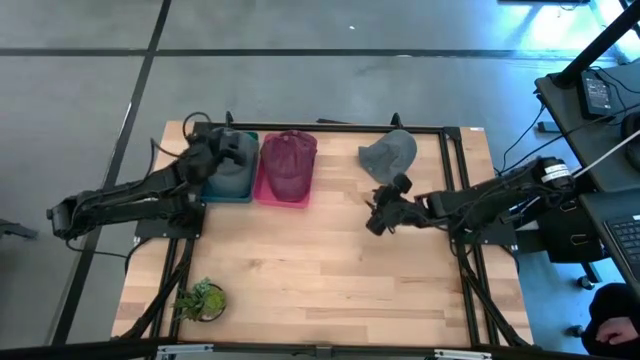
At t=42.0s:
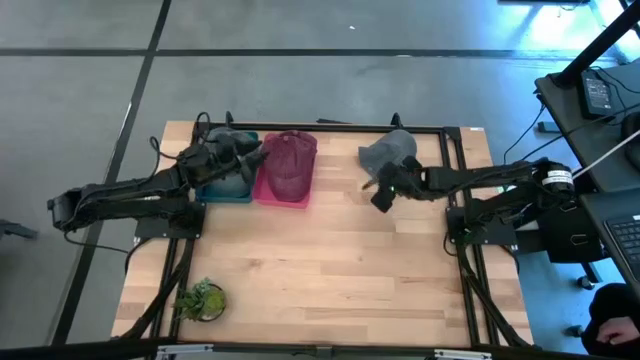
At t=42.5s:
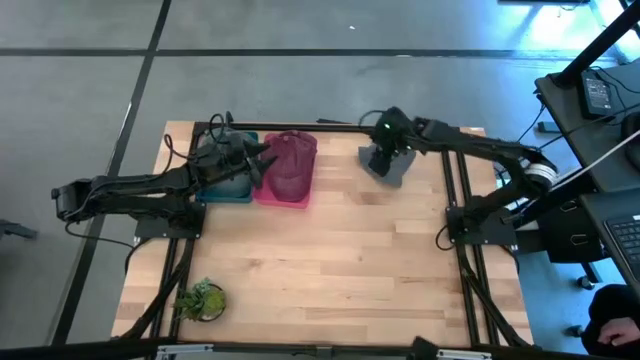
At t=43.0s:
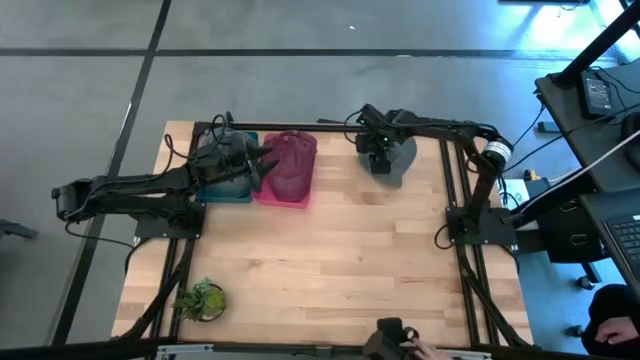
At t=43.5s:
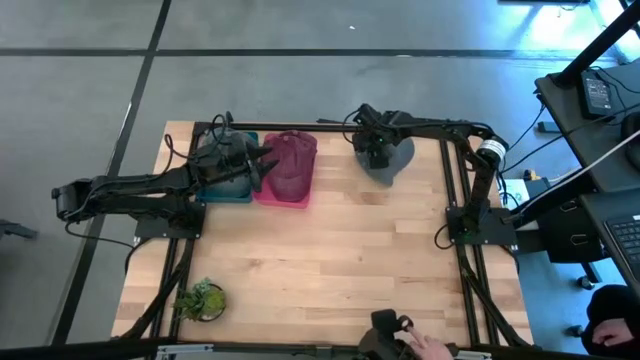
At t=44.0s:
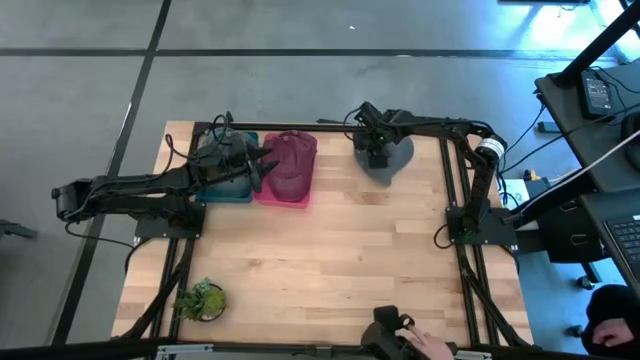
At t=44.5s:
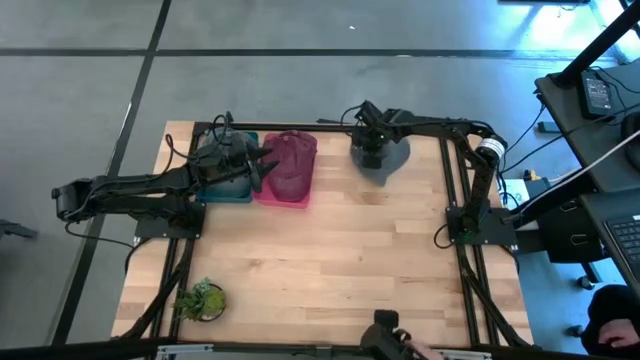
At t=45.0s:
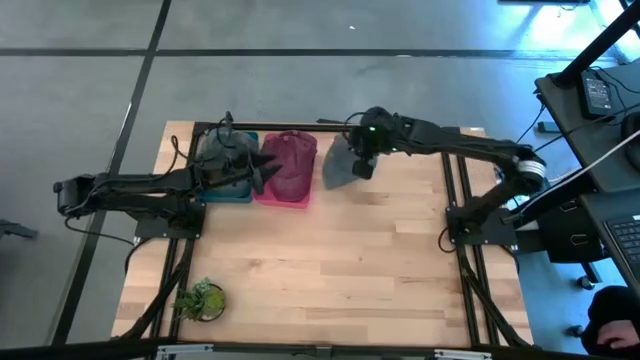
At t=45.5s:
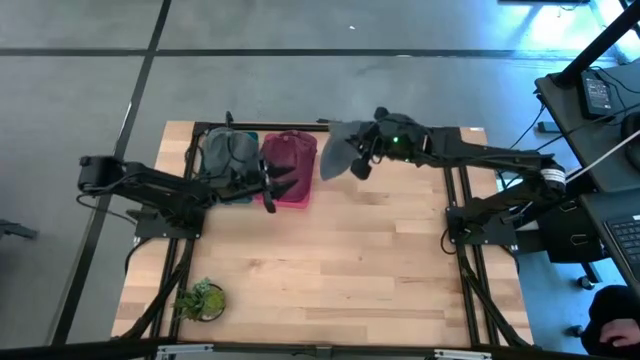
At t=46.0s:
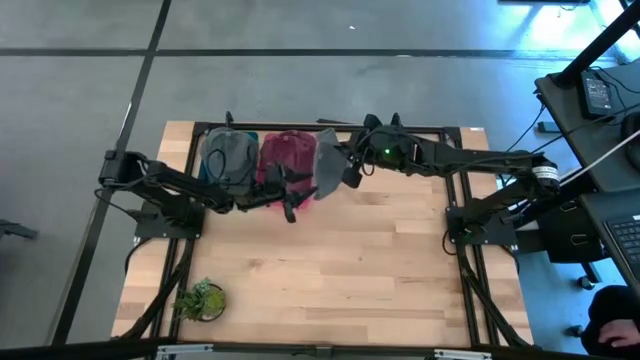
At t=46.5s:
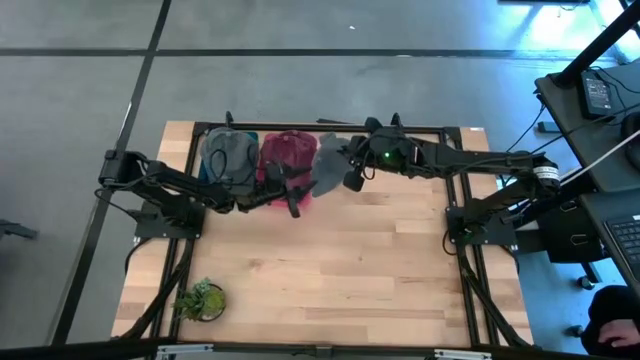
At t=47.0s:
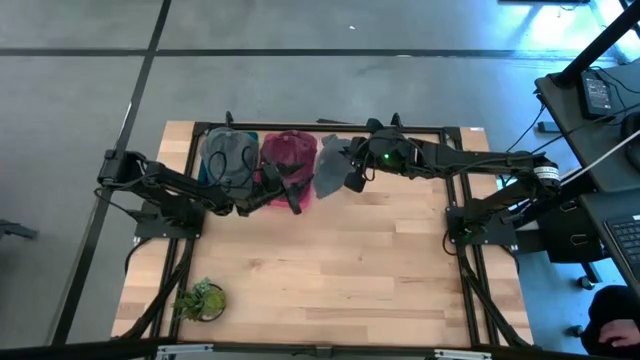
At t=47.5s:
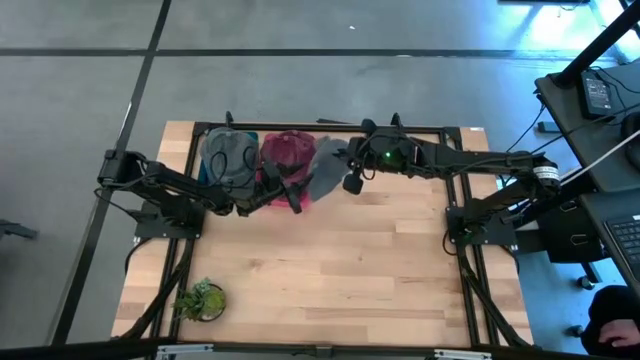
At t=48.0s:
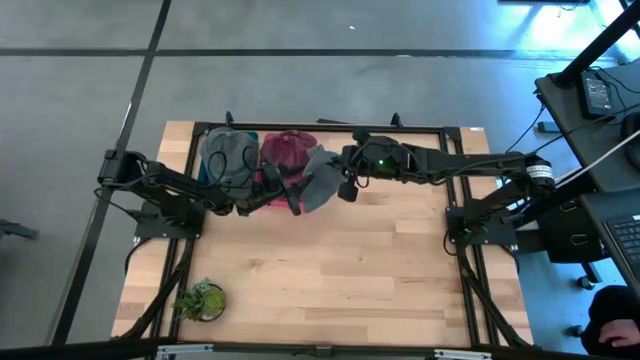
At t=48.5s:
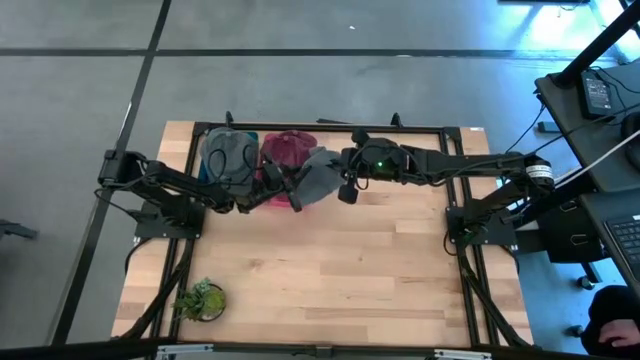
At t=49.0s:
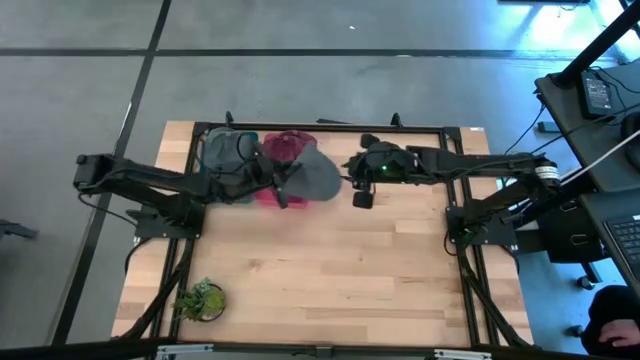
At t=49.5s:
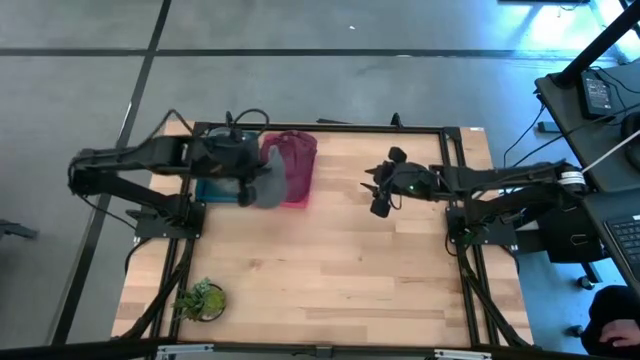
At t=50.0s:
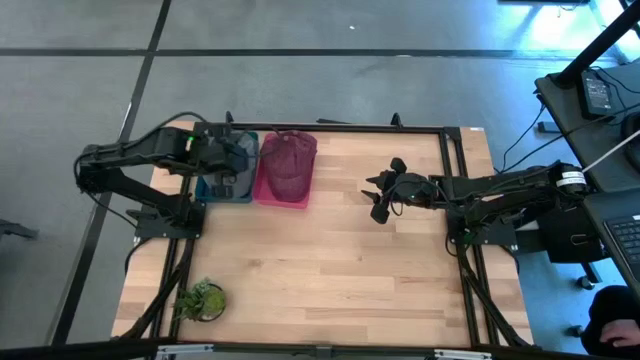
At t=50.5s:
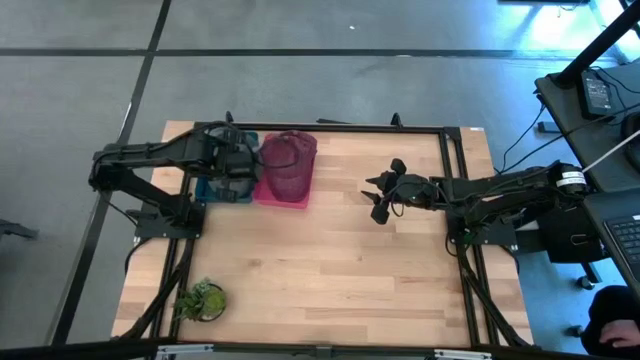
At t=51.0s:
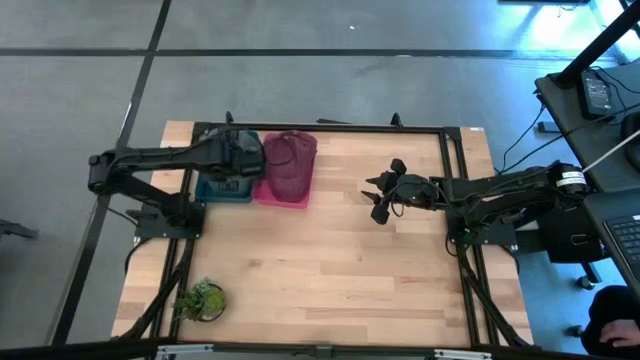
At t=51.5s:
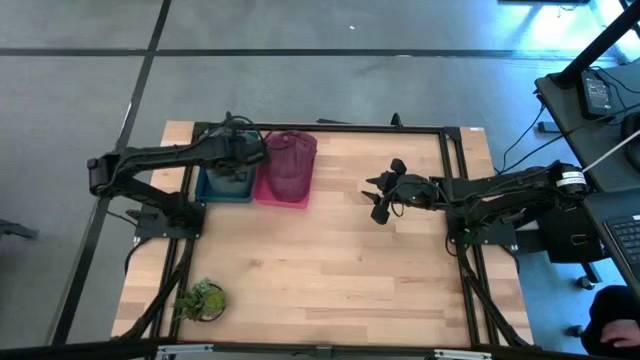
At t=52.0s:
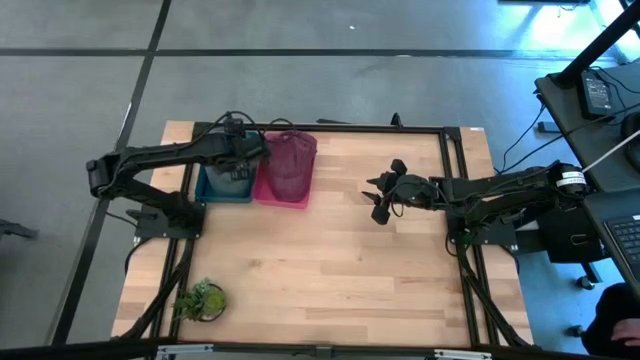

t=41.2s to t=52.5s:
Task: Pick & Place hat
Put the blue cap into the blue bin

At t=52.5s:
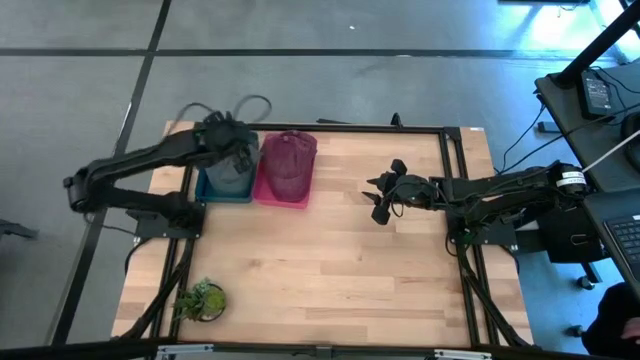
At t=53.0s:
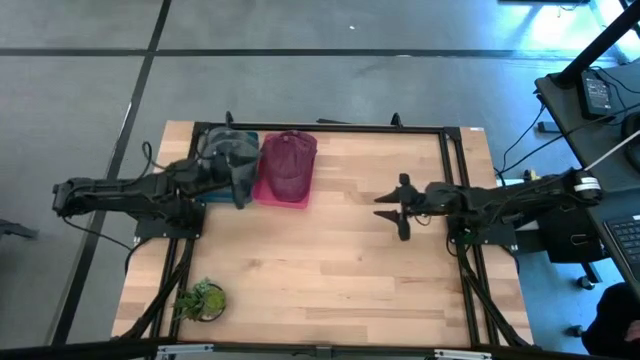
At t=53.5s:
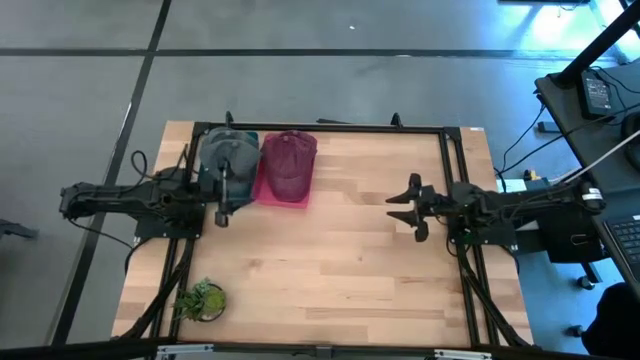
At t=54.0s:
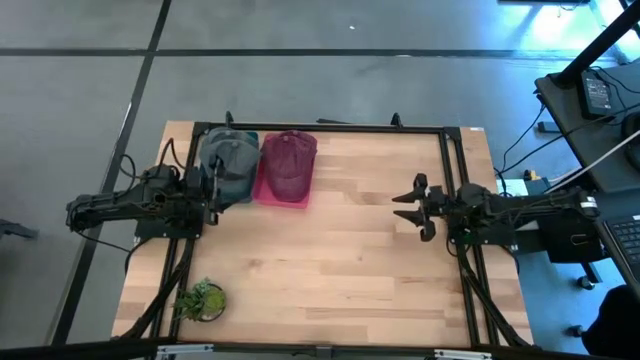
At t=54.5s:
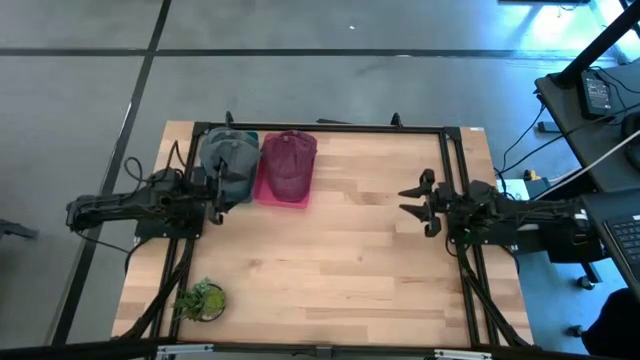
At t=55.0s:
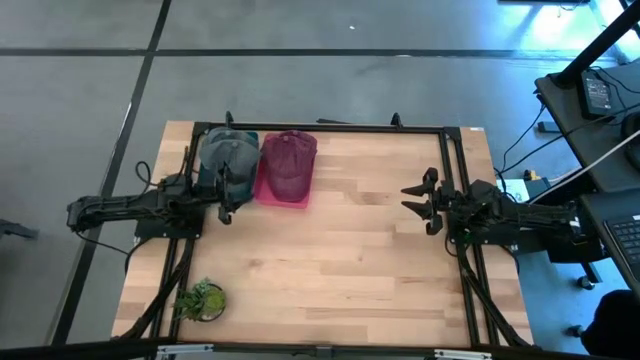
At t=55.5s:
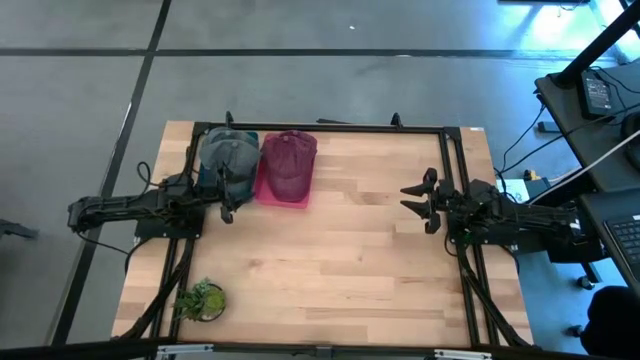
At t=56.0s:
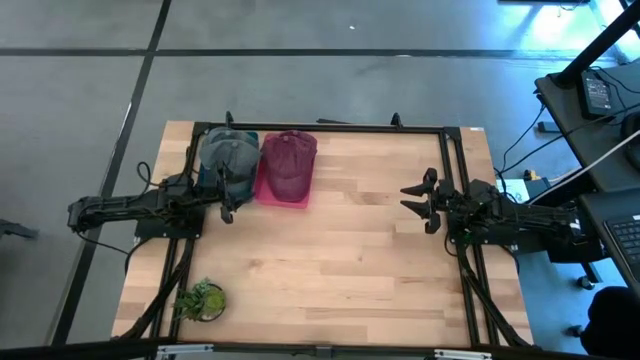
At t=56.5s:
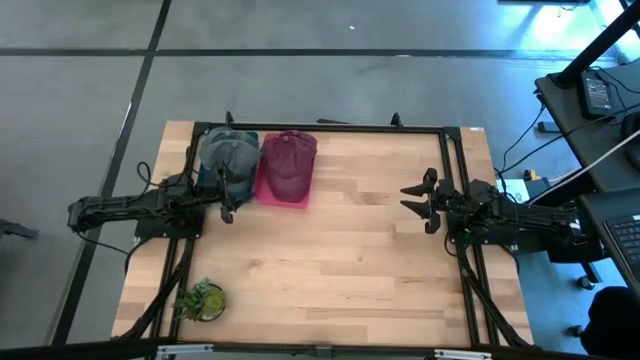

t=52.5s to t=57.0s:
Return to Home Position

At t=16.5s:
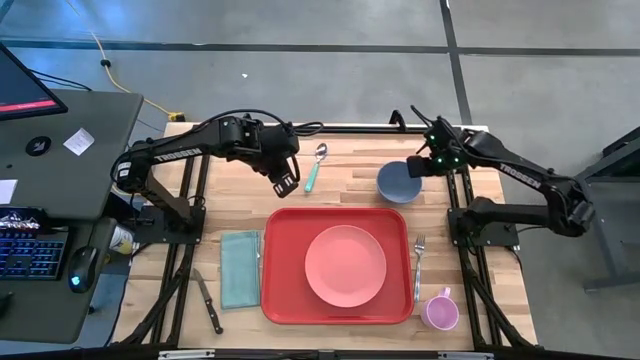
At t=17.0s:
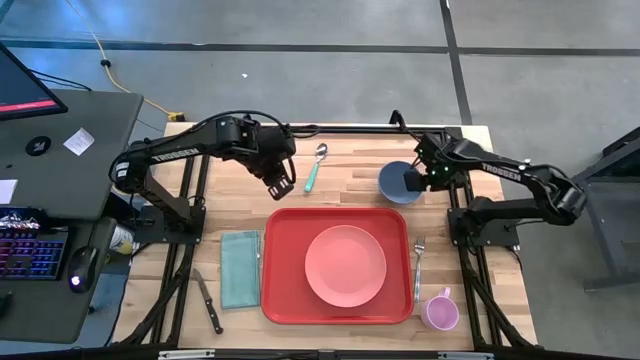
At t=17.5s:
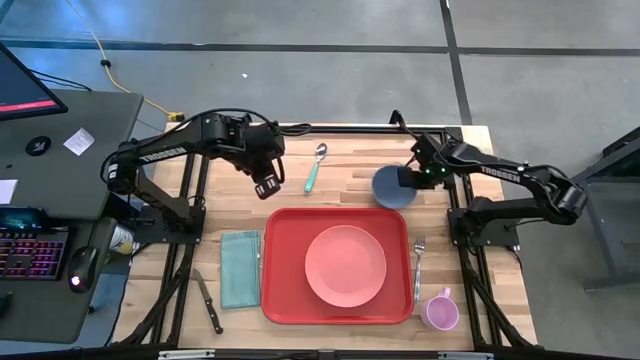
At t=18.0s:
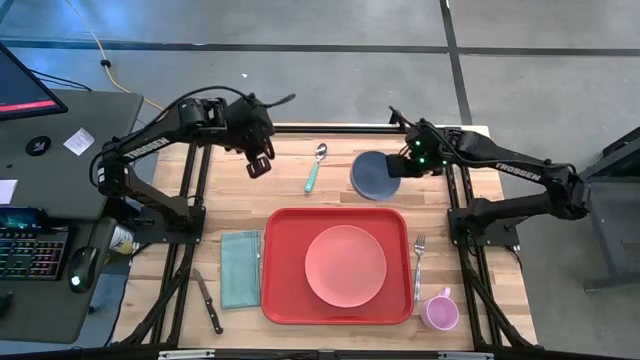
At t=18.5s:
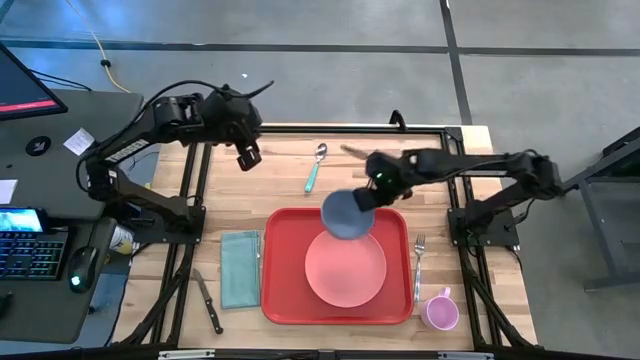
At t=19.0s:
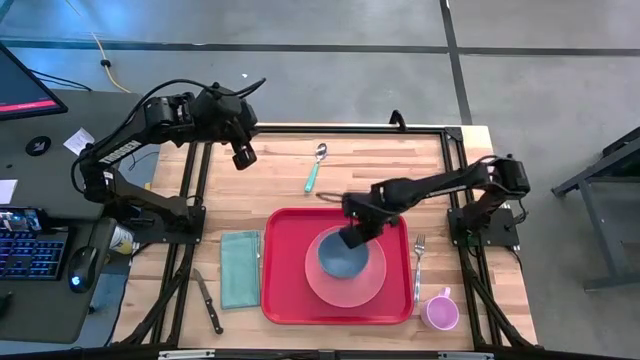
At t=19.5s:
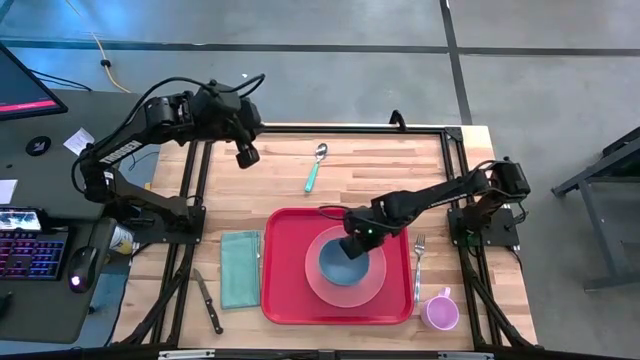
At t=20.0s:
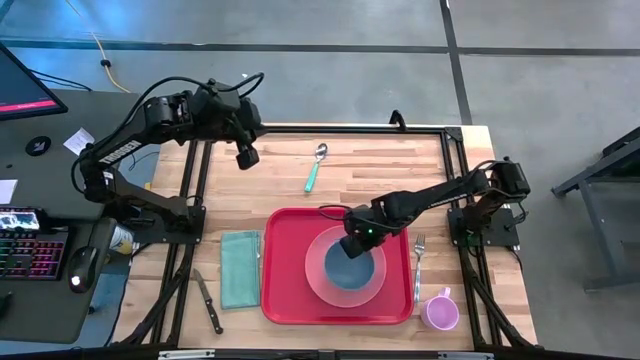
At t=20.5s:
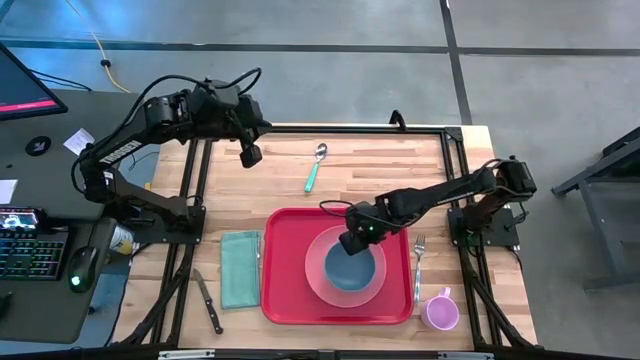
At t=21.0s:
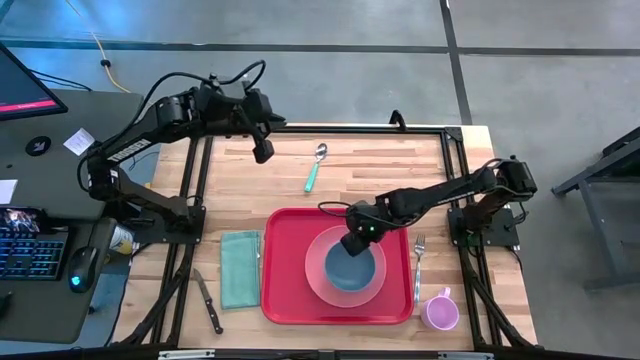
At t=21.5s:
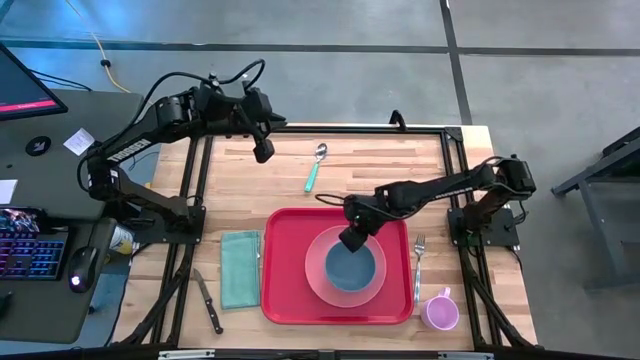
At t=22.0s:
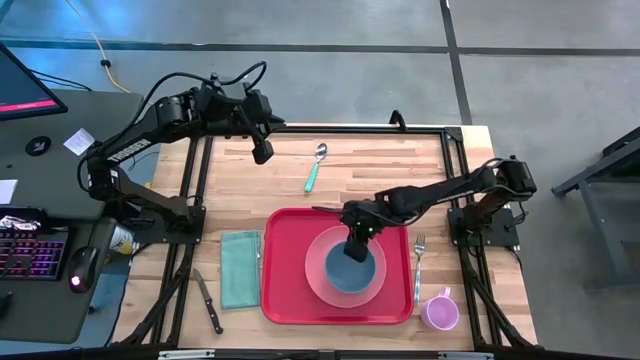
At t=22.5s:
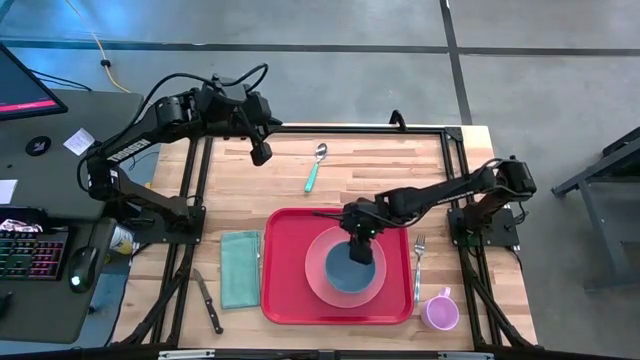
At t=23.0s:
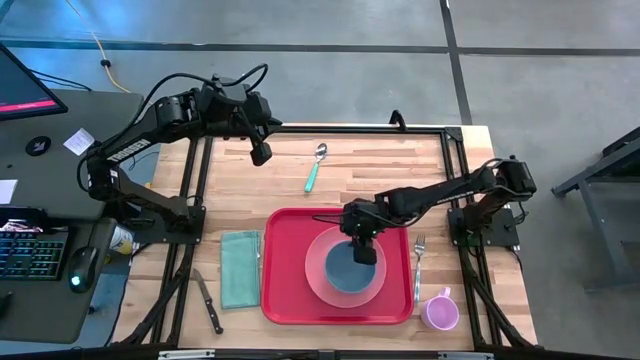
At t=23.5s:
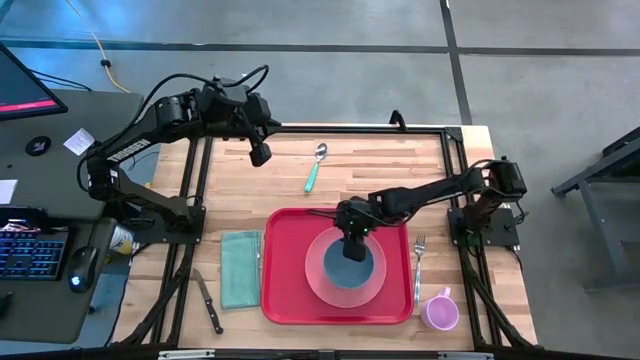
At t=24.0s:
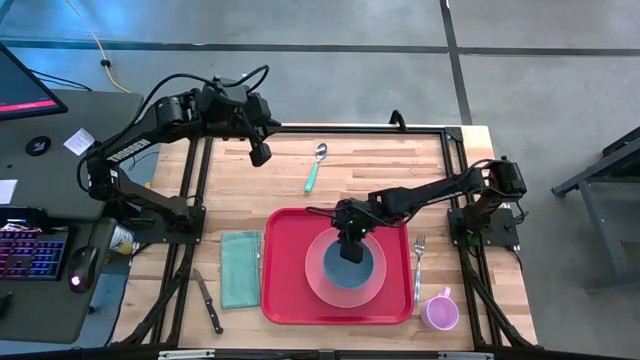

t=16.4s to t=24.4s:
Task: Set up tray
Put the blue bowl on the pink plate
